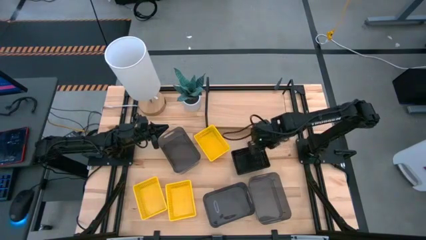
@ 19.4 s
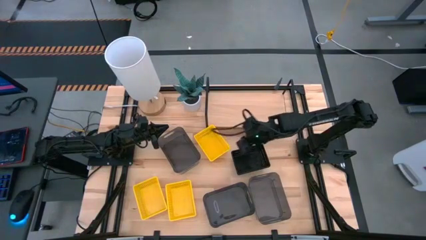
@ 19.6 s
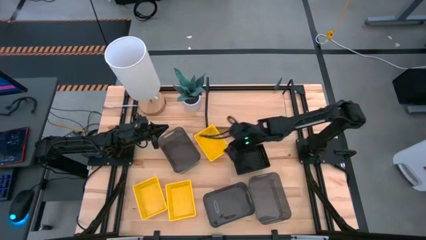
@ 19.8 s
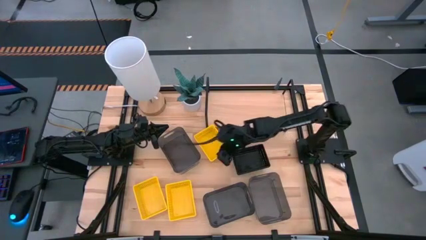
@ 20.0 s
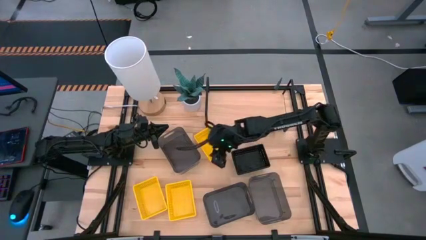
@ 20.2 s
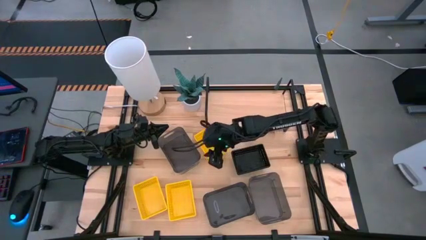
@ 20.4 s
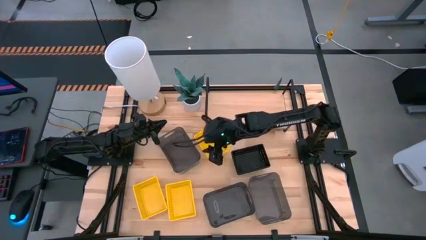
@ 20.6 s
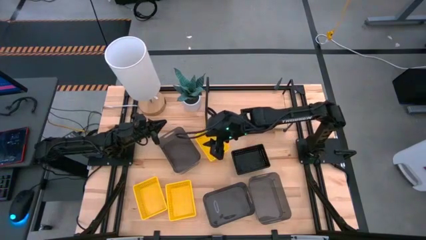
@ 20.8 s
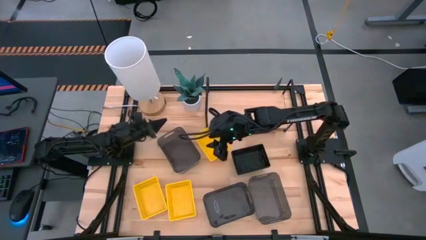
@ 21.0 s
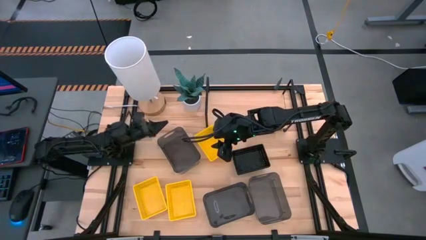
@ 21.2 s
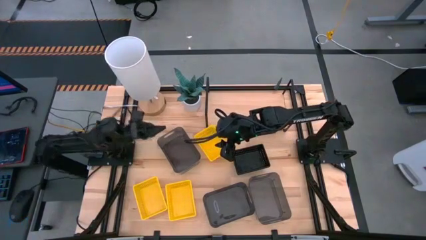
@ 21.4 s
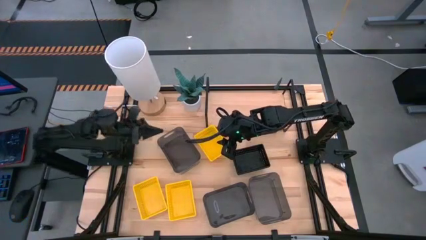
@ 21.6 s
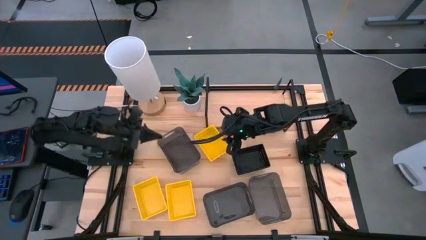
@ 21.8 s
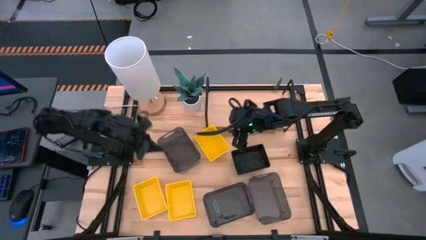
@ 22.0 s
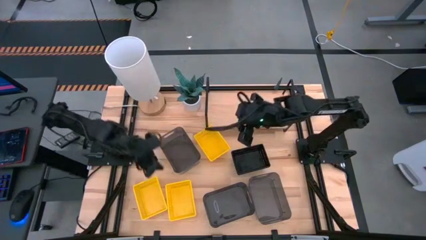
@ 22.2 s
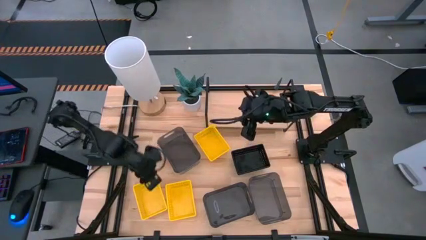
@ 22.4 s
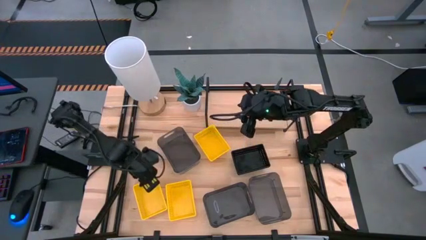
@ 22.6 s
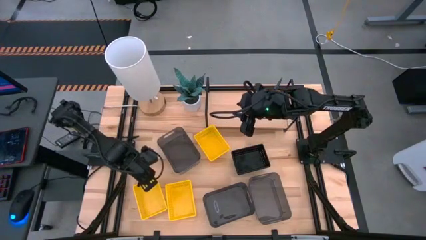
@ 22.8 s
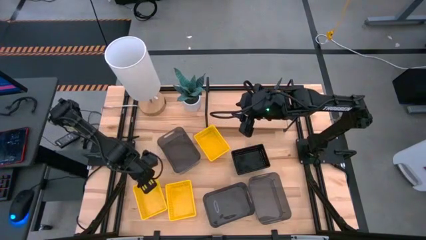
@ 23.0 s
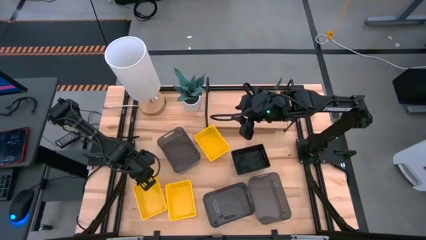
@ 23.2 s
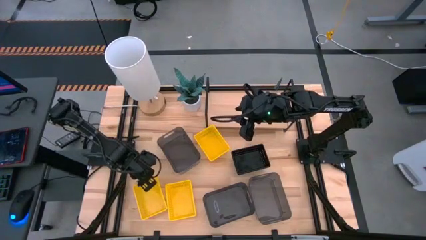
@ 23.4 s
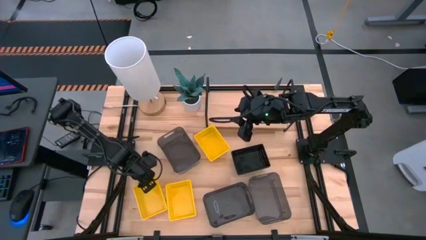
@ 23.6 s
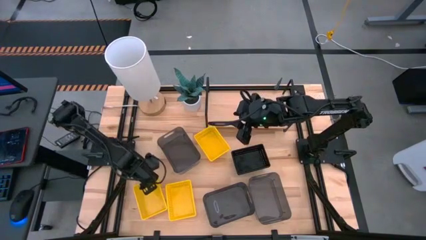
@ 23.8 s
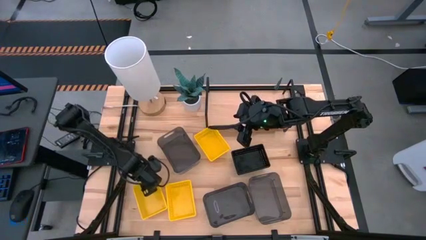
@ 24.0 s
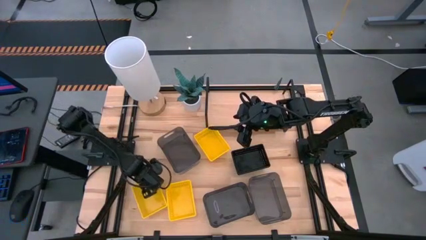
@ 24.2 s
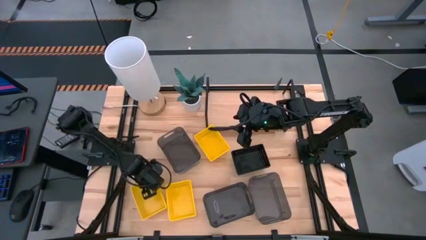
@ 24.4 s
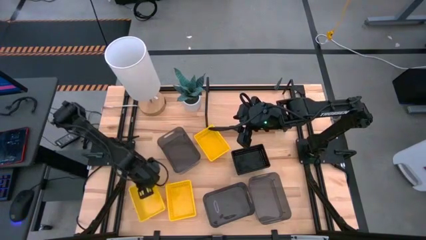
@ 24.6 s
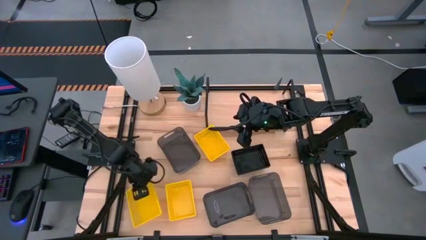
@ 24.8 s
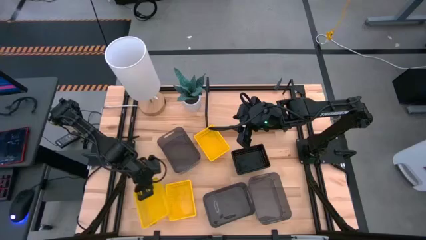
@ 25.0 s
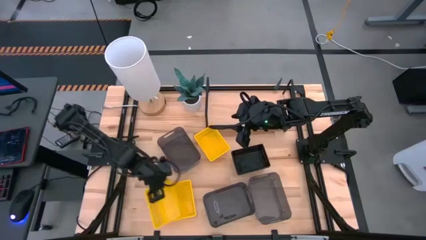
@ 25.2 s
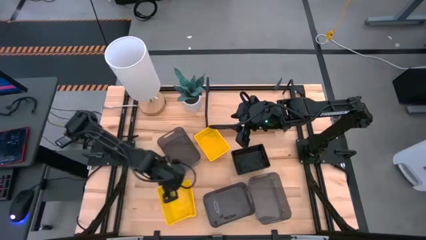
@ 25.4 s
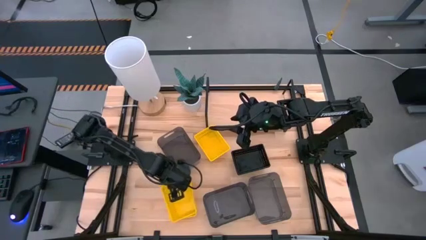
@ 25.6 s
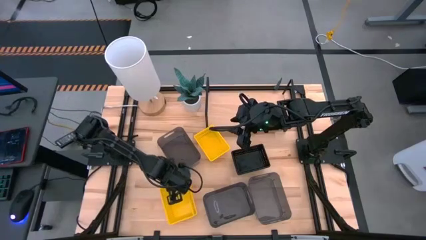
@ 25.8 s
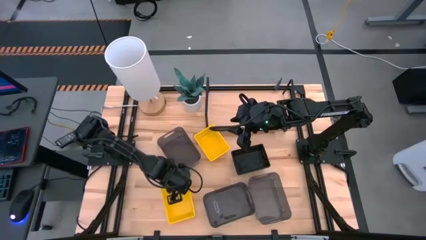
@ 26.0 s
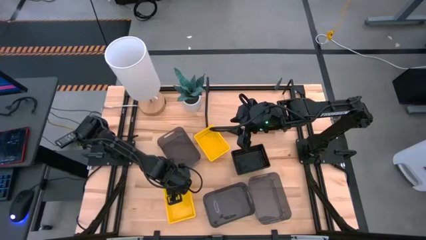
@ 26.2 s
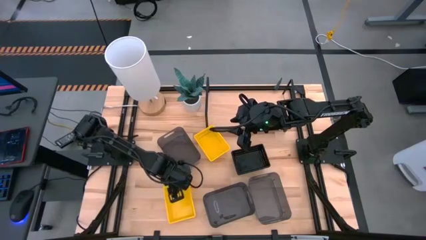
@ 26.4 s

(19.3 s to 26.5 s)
Task: Stack baskets on shelf by color
Stack the bottom left yellow bin on the bottom center yellow bin

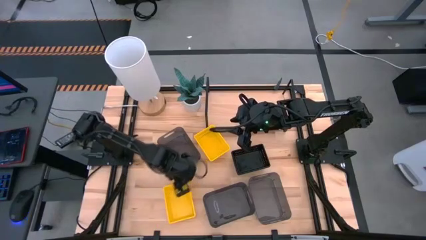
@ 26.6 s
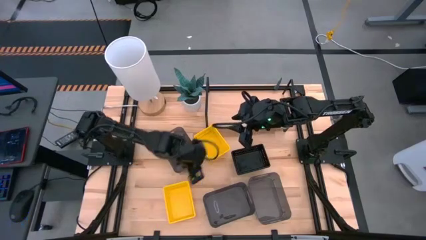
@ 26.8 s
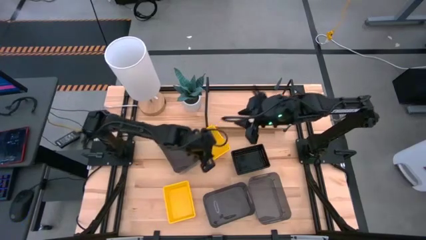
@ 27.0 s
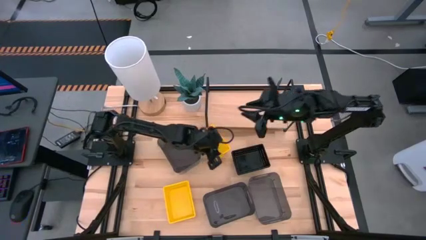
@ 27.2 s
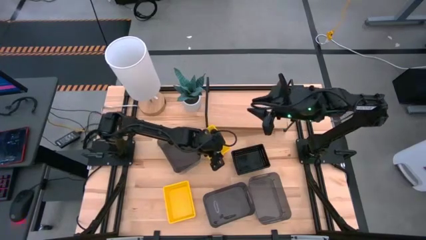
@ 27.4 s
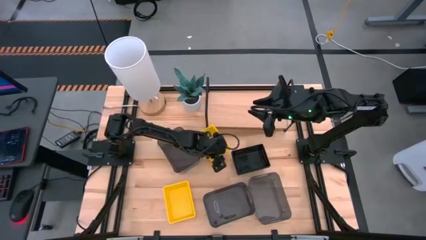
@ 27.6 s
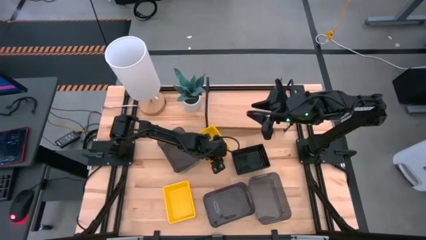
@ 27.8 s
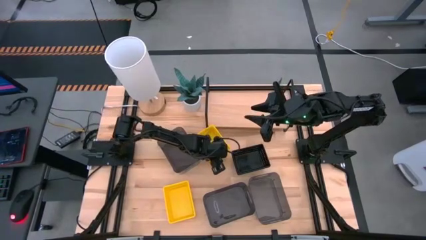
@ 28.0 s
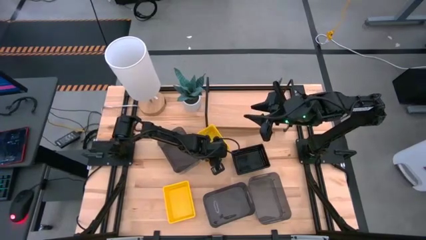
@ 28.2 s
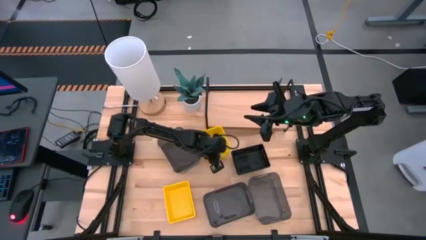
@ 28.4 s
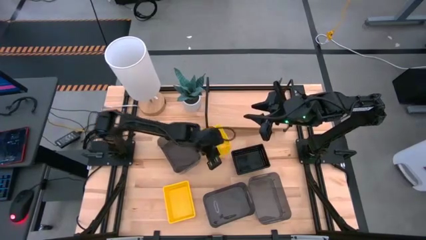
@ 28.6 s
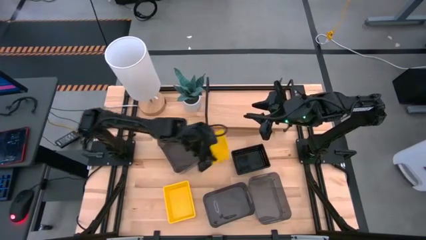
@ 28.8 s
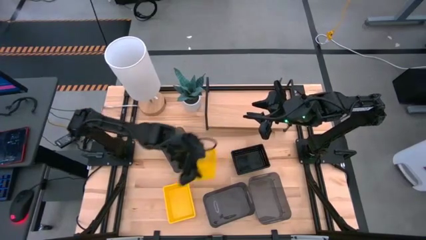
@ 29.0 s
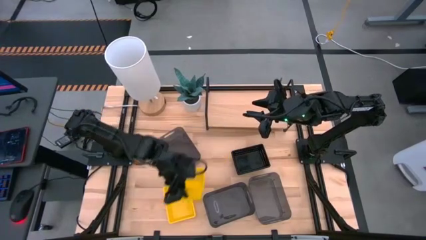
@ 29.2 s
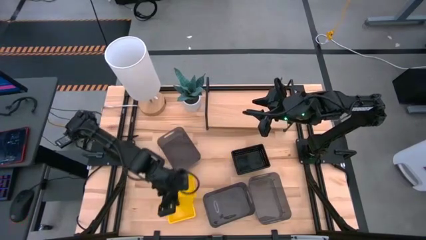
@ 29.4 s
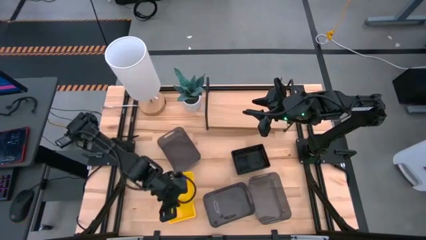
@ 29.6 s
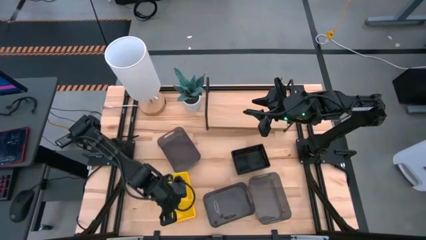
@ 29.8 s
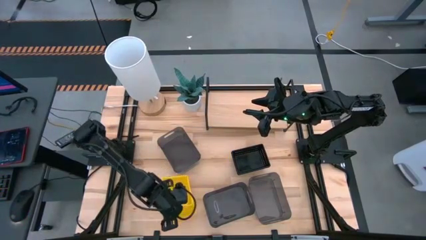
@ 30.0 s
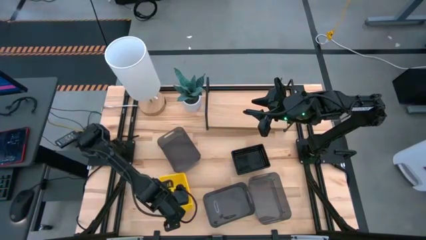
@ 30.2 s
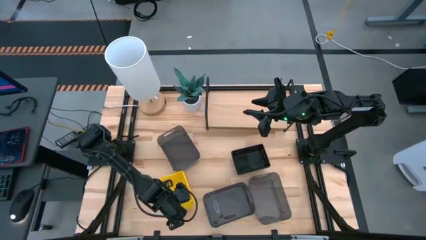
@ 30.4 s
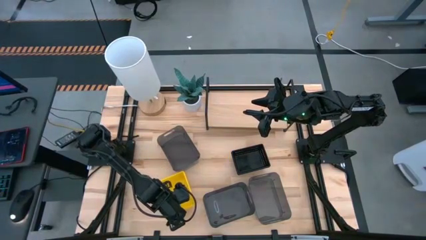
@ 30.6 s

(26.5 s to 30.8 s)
Stack the top yellow bin on the bottom yellow bin

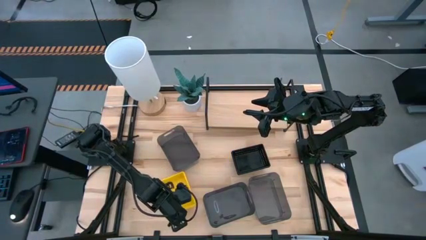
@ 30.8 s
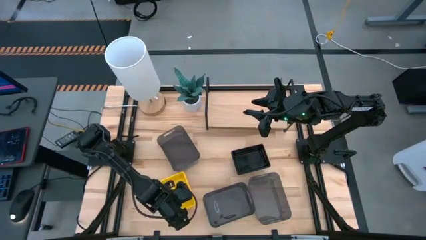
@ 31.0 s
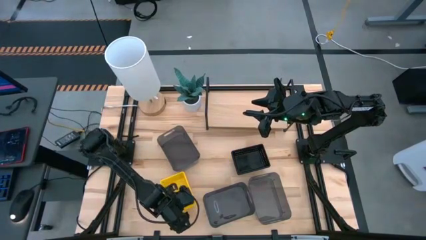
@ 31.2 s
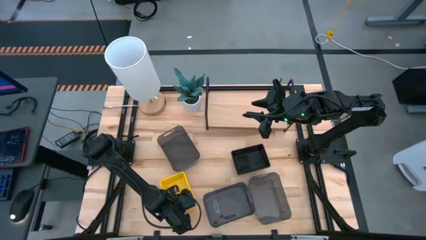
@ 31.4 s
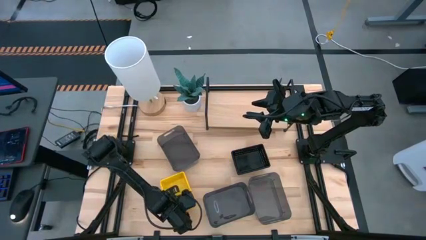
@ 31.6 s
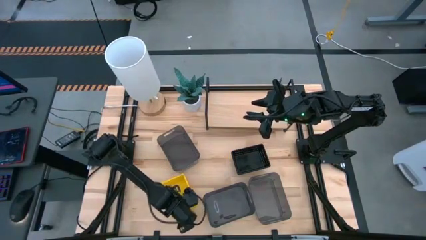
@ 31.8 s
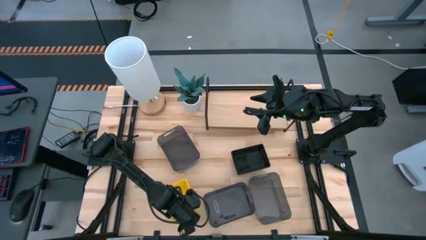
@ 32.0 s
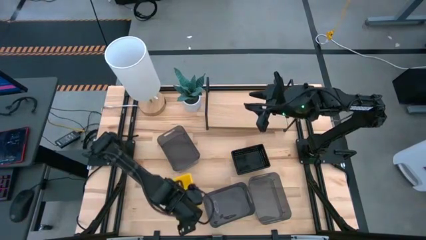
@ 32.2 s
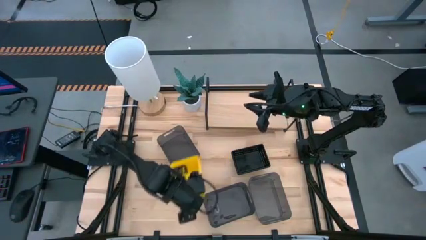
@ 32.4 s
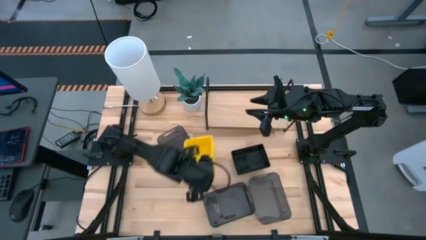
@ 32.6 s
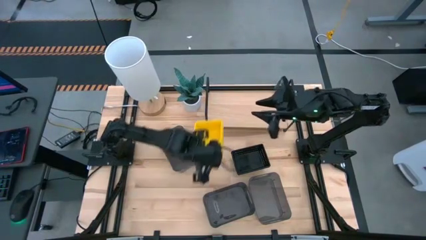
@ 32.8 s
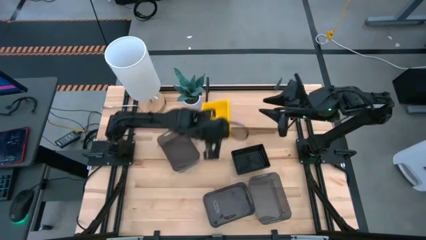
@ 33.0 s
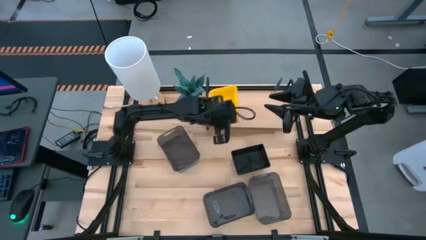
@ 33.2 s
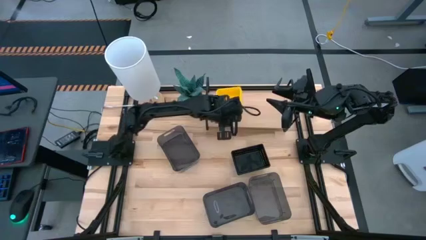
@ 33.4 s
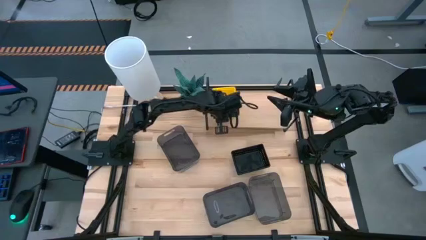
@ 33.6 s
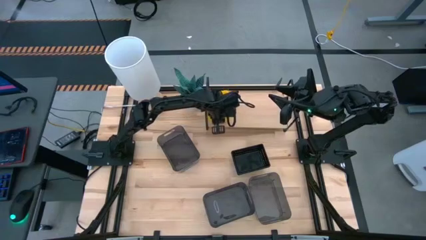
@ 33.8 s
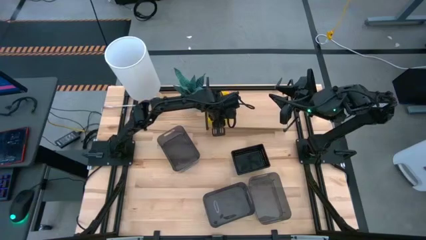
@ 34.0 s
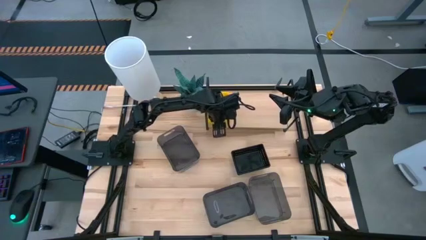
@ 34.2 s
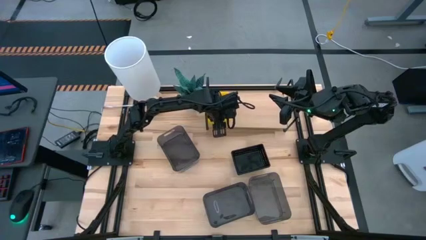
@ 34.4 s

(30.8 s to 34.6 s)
Put the stacked yellow bins on the shelf
